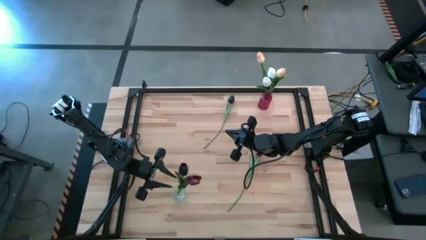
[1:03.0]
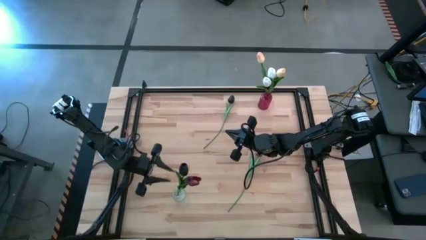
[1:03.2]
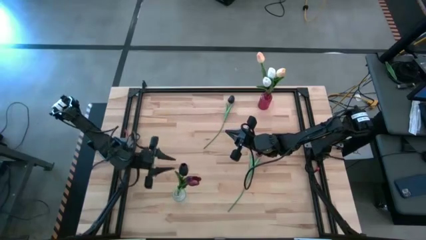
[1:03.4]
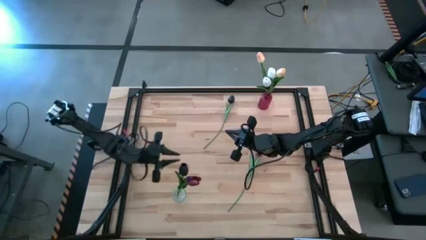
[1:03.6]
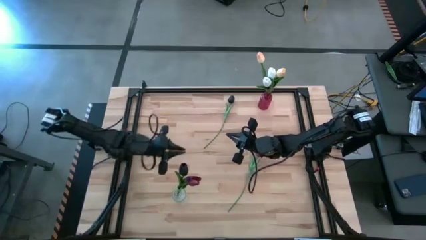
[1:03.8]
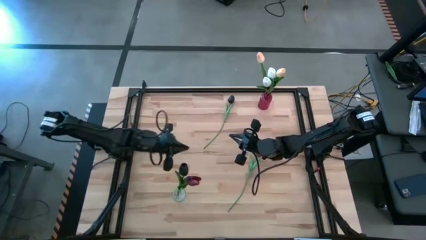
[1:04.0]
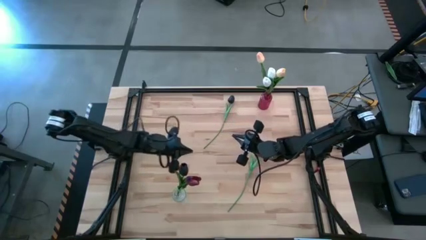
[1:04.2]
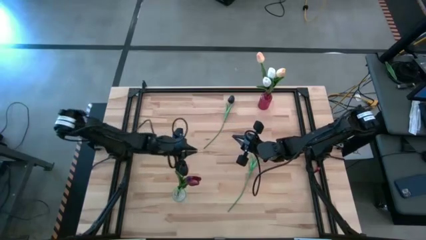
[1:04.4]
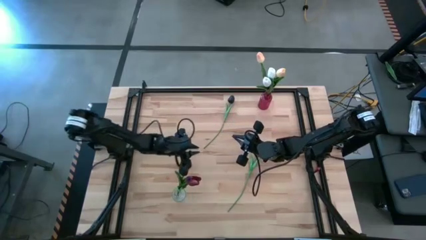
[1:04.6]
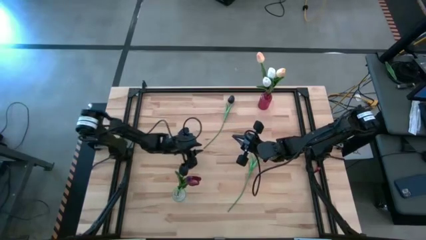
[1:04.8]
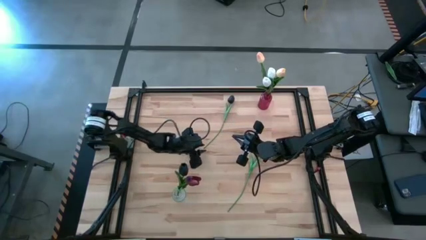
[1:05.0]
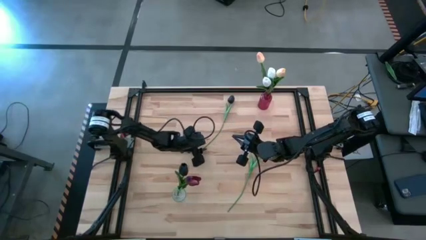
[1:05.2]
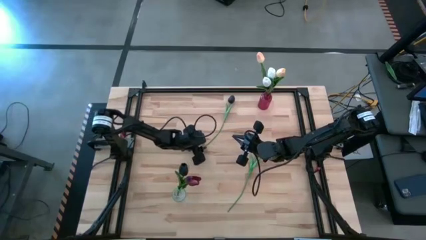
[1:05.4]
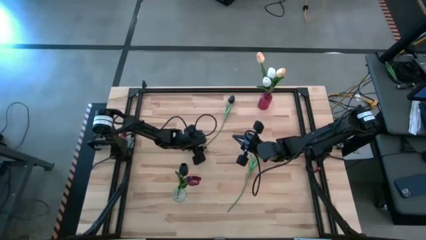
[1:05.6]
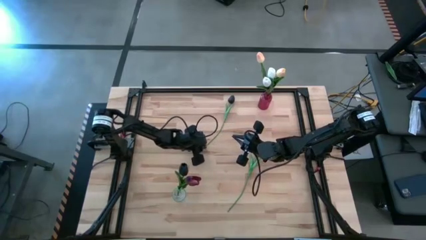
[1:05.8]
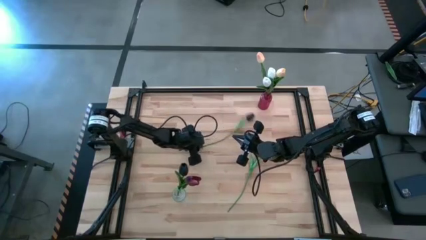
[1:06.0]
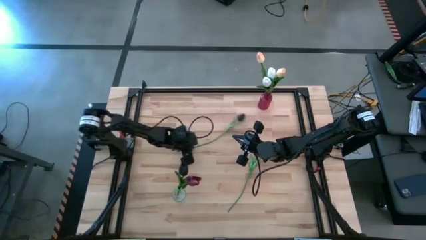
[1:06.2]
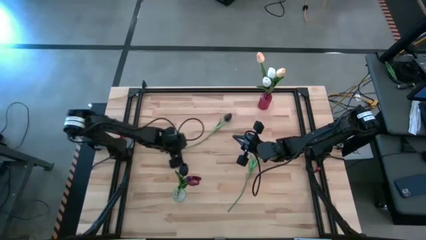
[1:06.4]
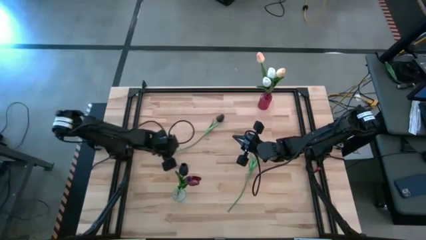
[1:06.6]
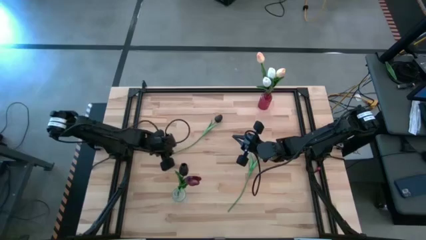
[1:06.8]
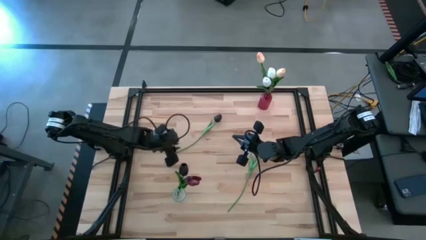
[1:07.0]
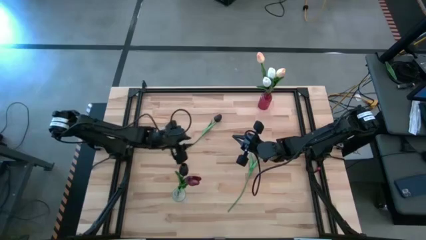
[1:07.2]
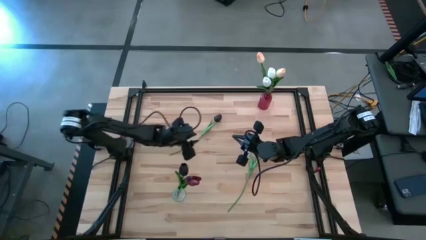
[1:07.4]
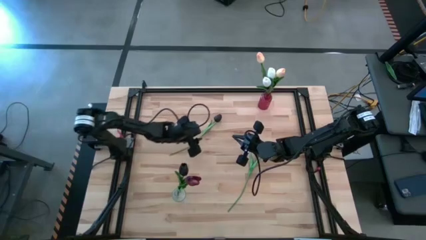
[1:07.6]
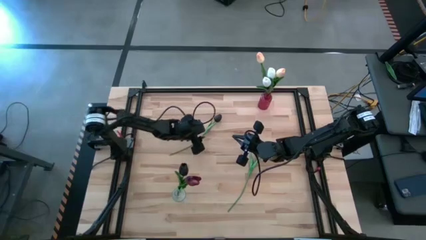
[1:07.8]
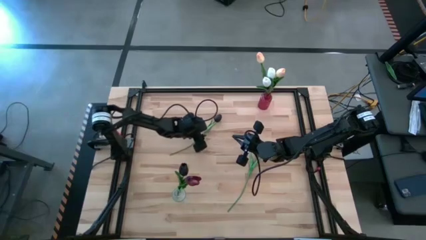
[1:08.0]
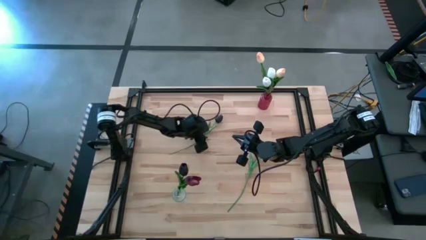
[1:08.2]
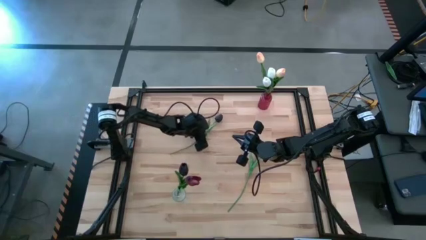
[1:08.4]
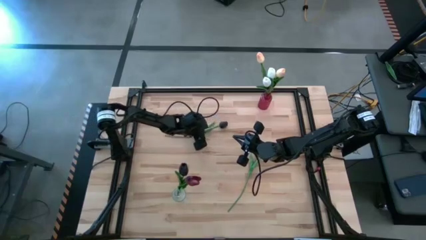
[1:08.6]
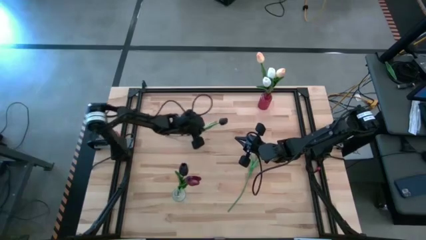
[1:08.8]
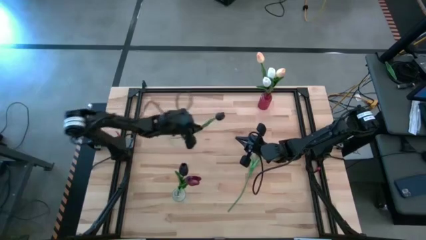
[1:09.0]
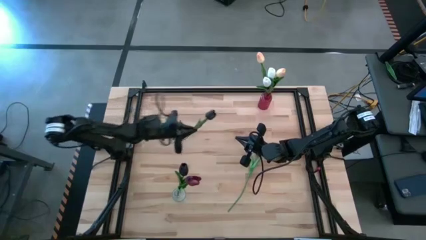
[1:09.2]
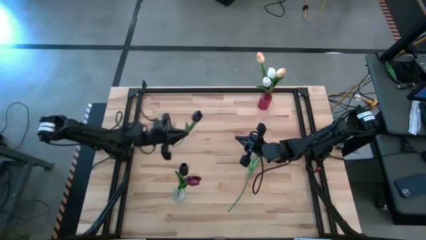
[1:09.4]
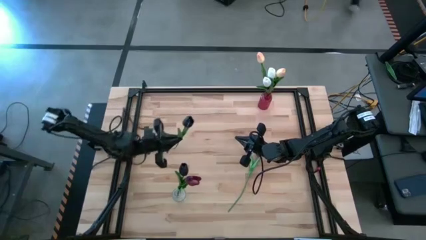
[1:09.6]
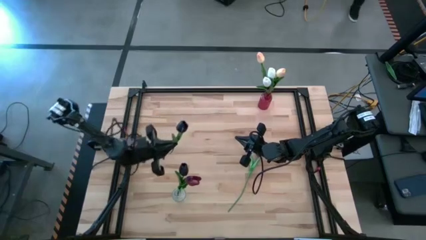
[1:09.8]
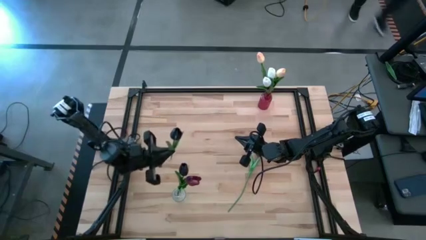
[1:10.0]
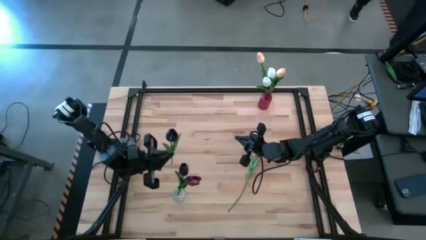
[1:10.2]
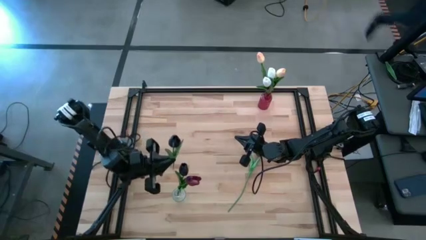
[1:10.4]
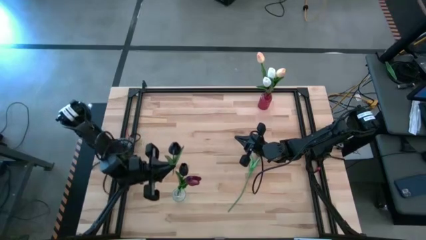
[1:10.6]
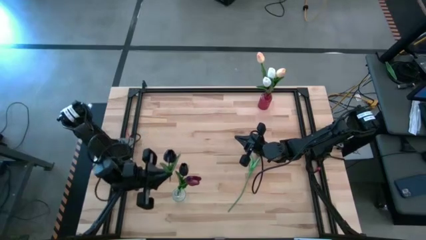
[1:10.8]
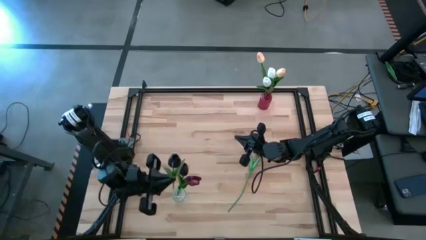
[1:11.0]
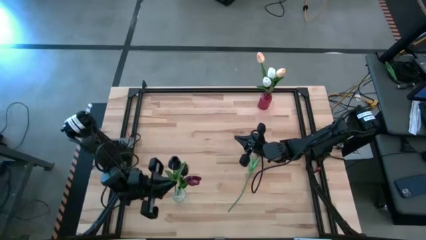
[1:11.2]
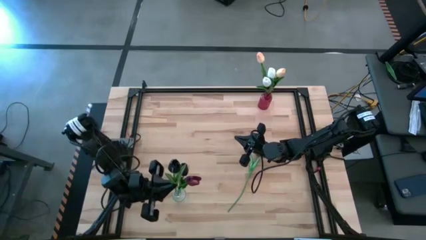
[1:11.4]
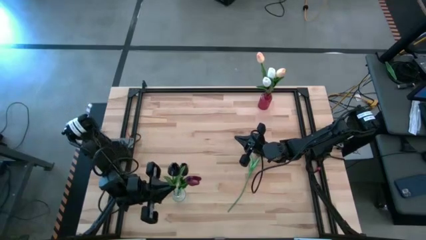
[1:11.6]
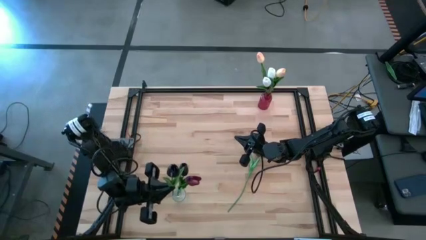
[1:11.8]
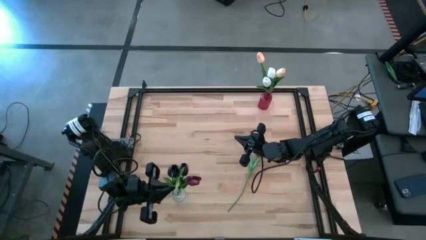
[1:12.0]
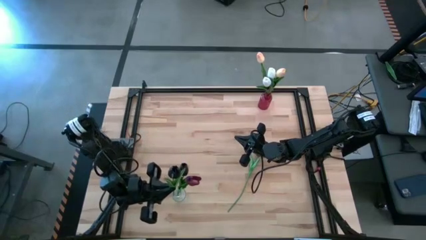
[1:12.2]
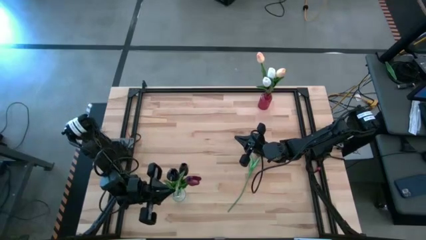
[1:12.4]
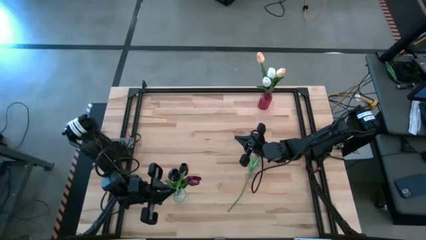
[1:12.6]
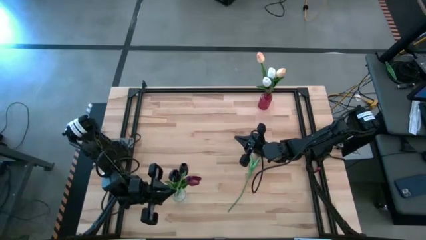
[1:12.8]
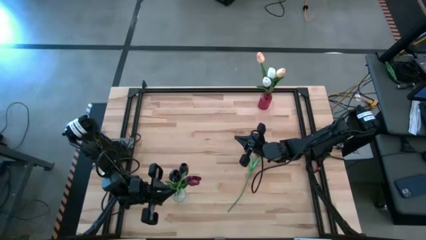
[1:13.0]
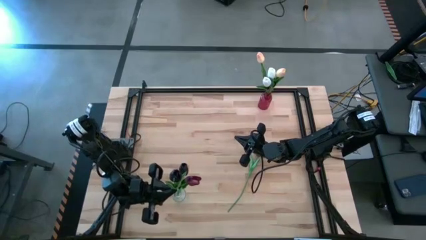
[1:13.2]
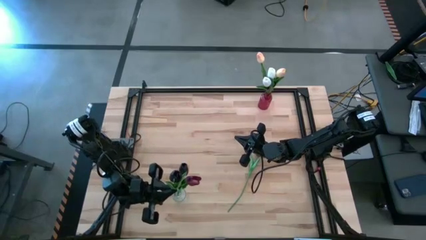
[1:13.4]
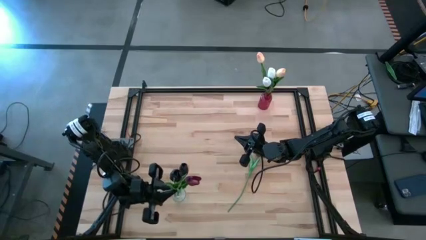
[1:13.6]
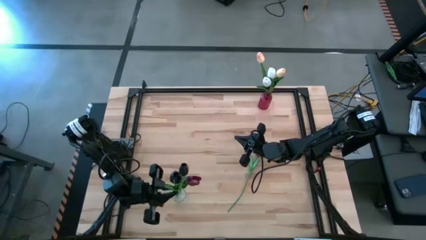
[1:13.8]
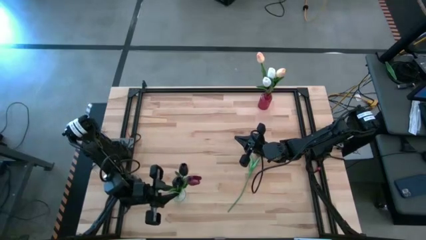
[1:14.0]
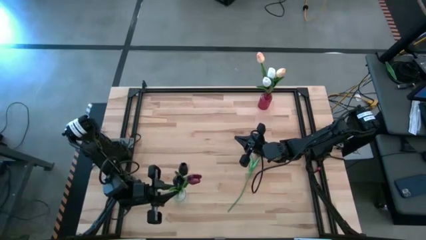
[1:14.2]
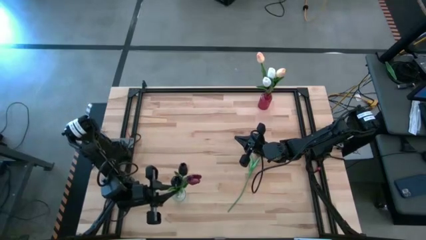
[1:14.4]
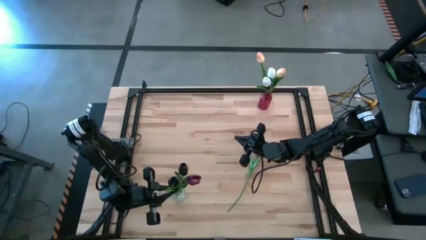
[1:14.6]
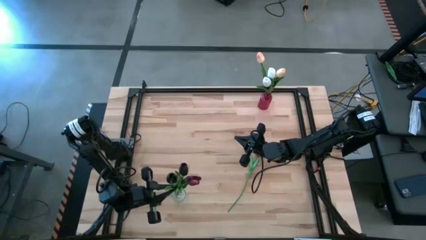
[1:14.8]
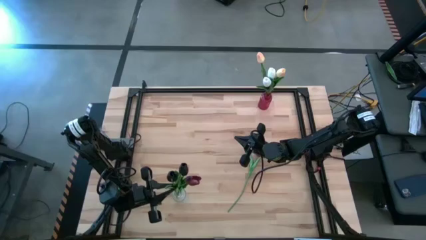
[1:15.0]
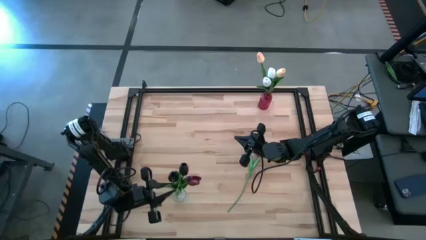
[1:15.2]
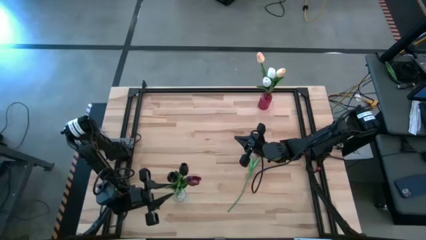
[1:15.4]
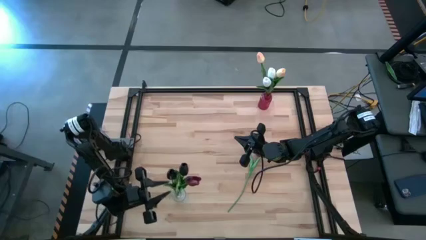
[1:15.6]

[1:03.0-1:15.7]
Task: Sort flowers into vase by color
Put the black flower into the transparent vase
